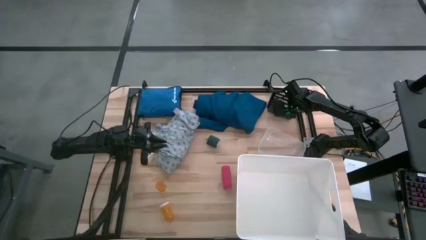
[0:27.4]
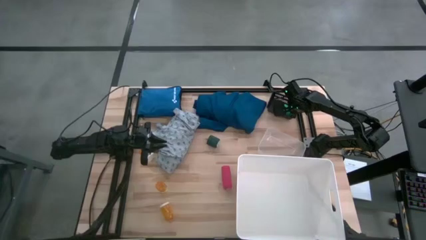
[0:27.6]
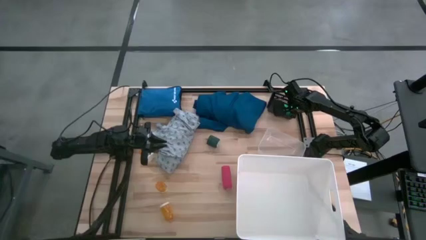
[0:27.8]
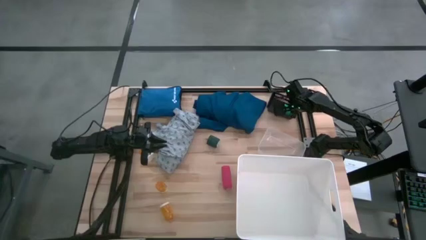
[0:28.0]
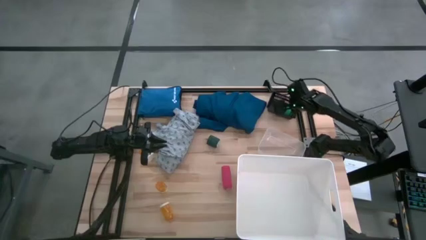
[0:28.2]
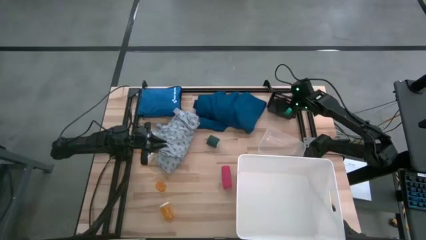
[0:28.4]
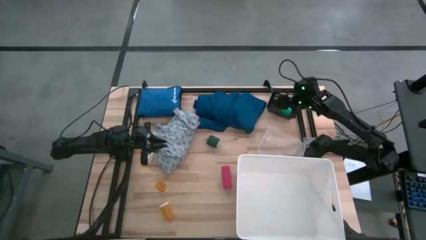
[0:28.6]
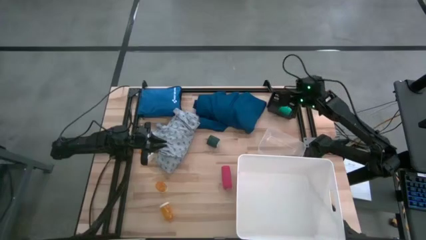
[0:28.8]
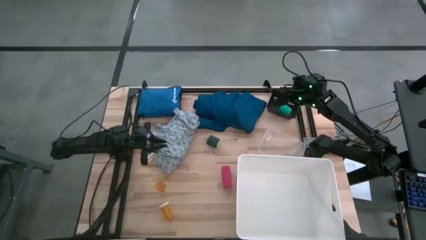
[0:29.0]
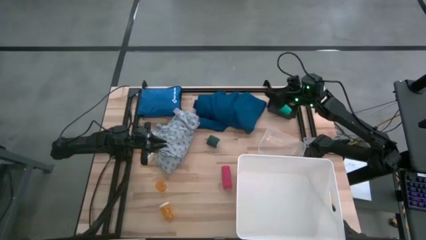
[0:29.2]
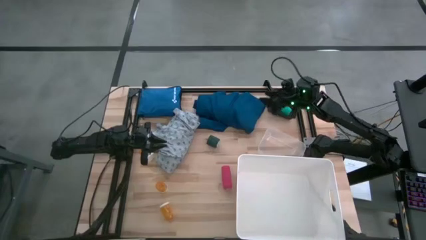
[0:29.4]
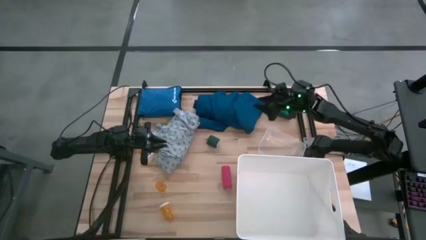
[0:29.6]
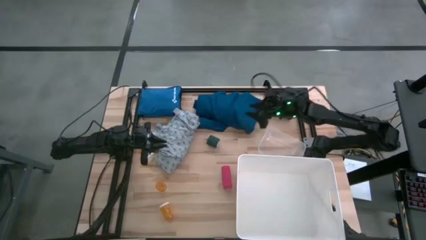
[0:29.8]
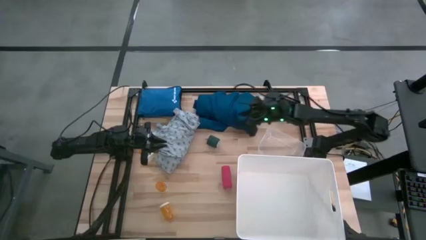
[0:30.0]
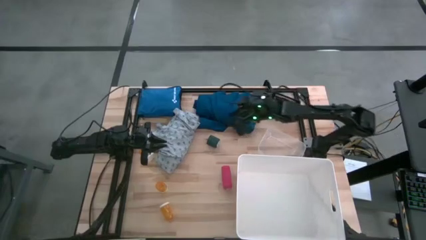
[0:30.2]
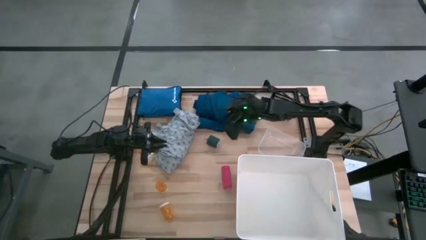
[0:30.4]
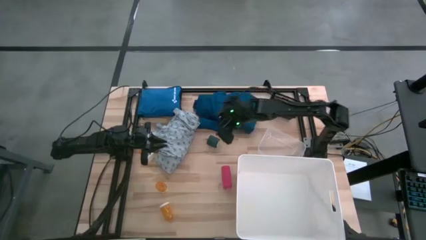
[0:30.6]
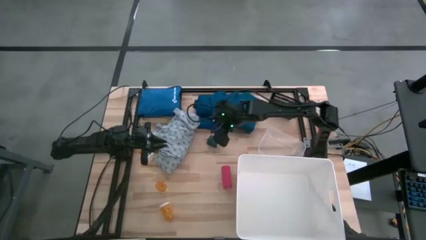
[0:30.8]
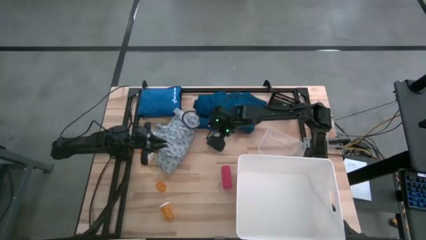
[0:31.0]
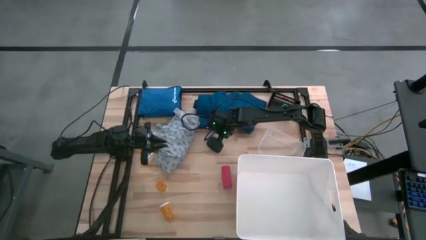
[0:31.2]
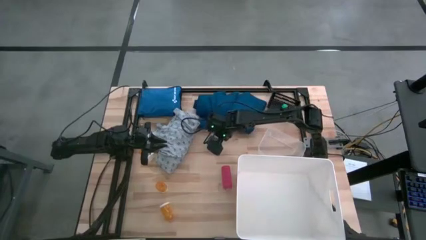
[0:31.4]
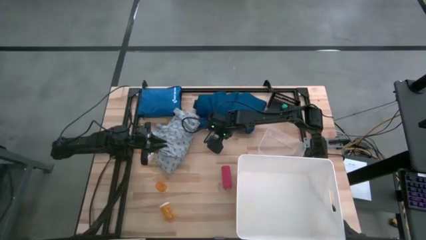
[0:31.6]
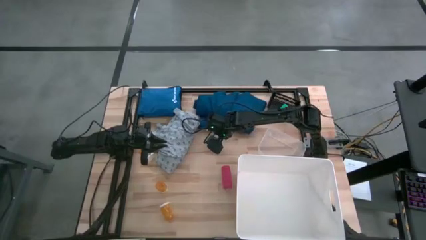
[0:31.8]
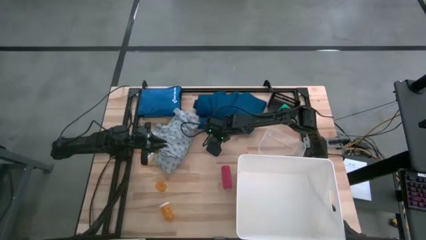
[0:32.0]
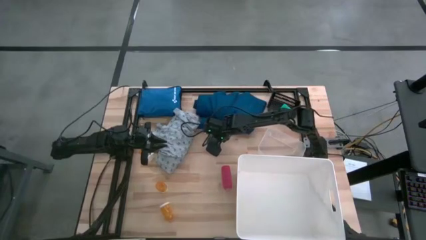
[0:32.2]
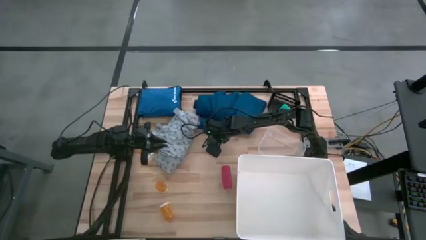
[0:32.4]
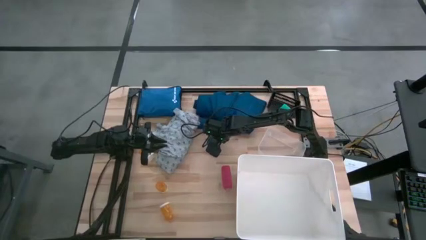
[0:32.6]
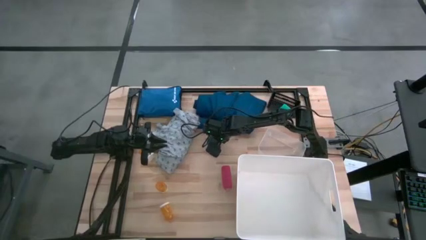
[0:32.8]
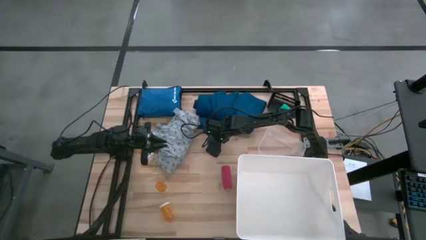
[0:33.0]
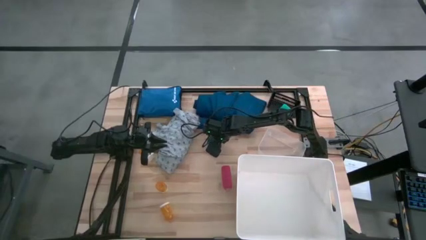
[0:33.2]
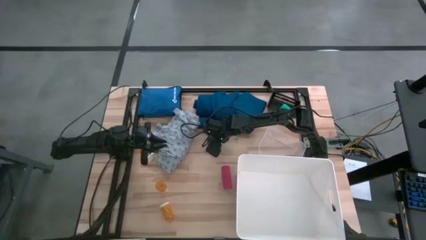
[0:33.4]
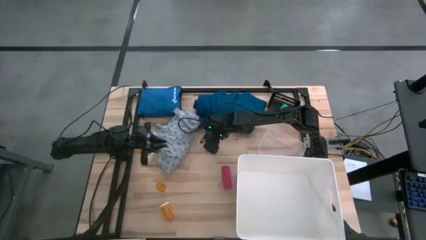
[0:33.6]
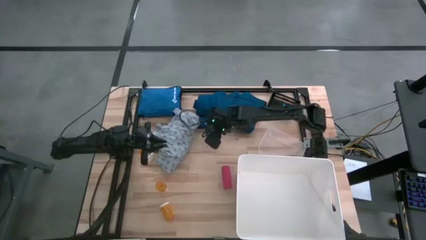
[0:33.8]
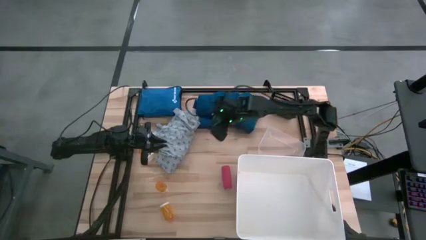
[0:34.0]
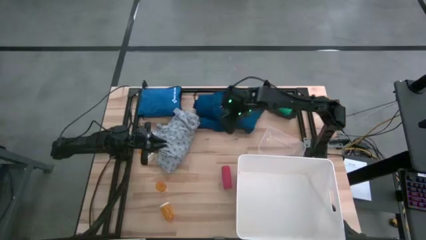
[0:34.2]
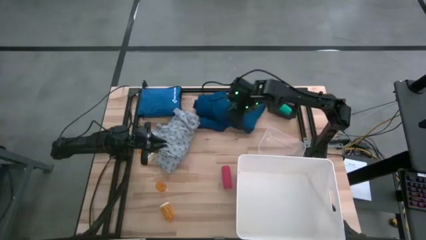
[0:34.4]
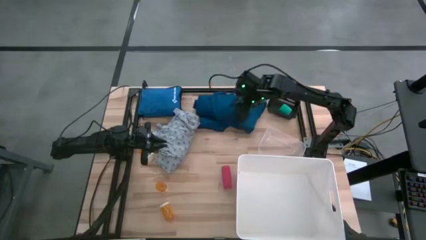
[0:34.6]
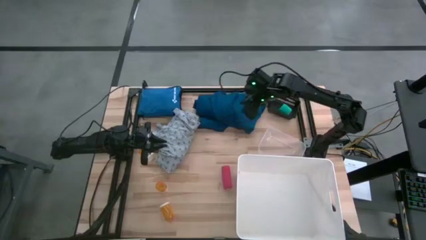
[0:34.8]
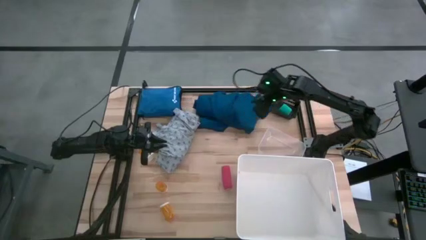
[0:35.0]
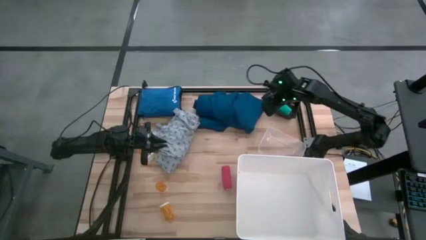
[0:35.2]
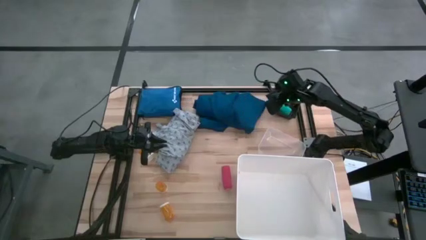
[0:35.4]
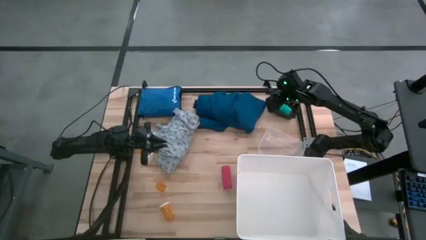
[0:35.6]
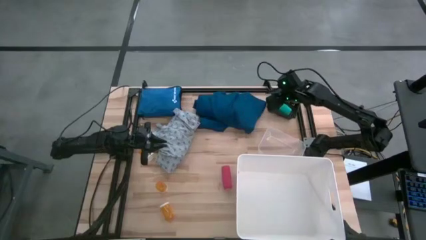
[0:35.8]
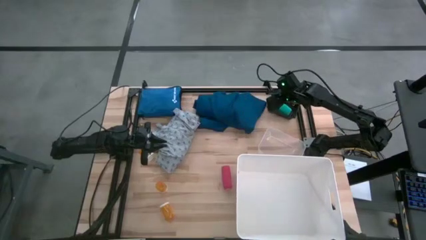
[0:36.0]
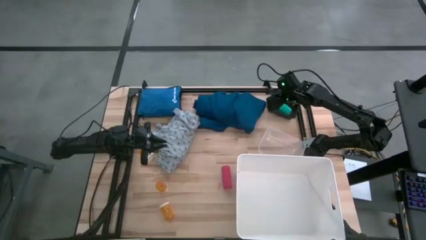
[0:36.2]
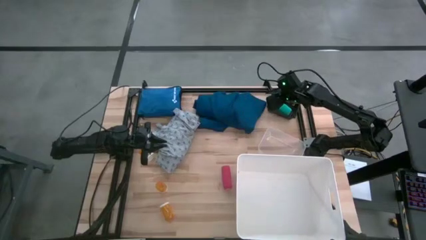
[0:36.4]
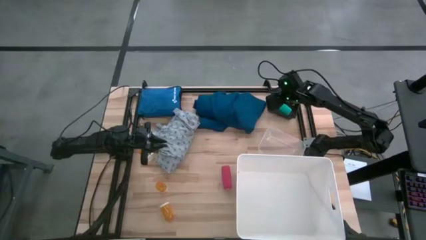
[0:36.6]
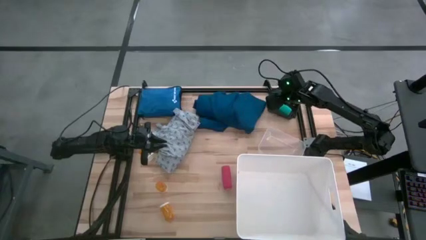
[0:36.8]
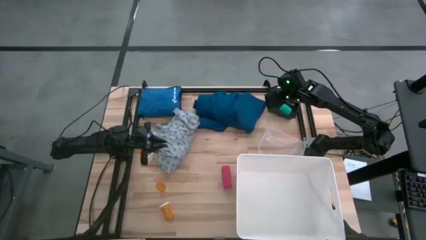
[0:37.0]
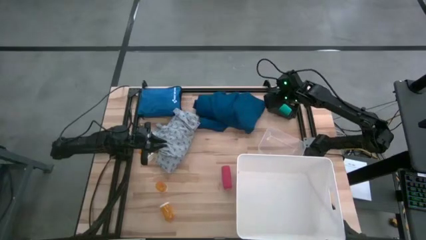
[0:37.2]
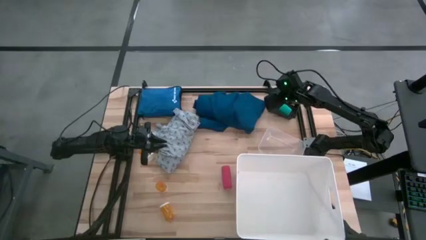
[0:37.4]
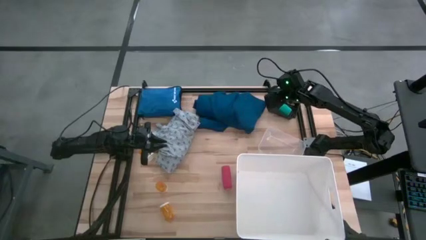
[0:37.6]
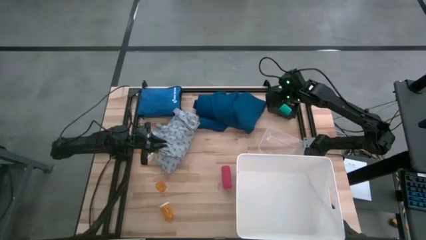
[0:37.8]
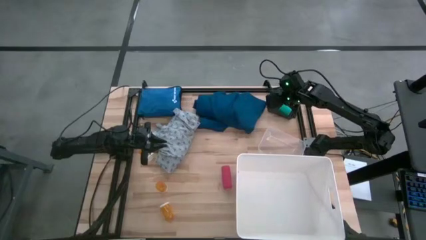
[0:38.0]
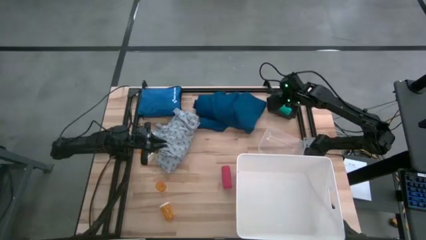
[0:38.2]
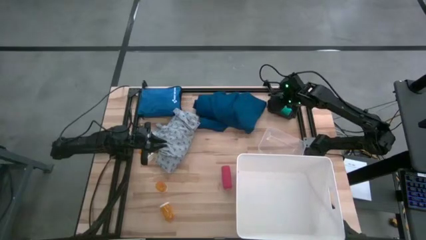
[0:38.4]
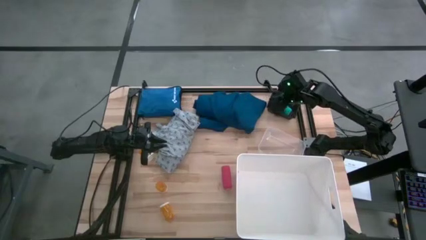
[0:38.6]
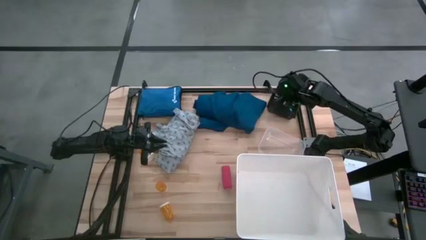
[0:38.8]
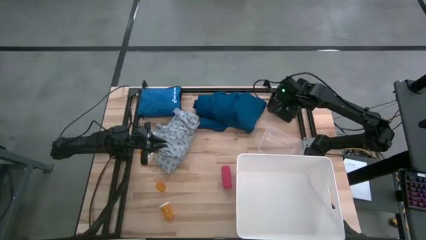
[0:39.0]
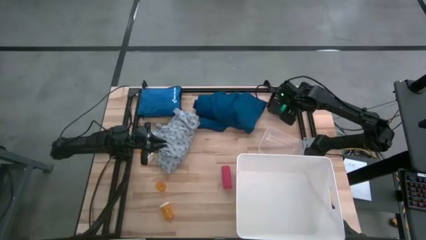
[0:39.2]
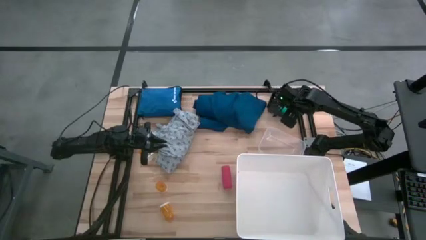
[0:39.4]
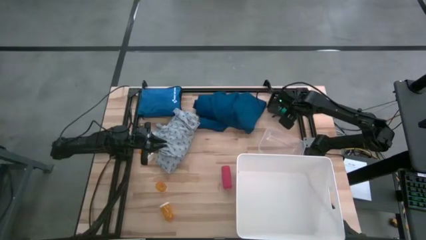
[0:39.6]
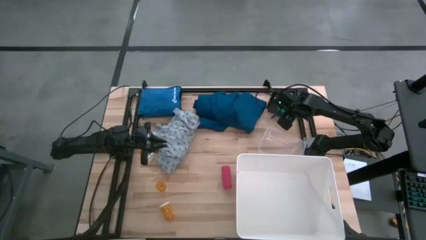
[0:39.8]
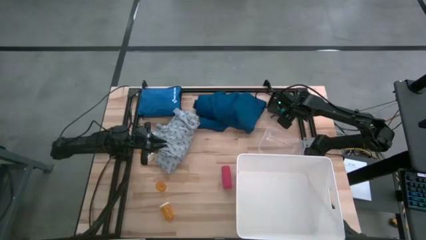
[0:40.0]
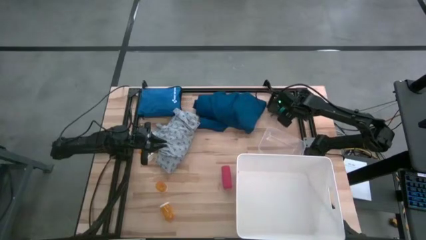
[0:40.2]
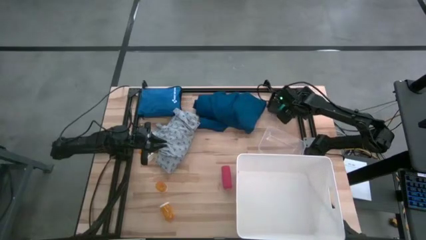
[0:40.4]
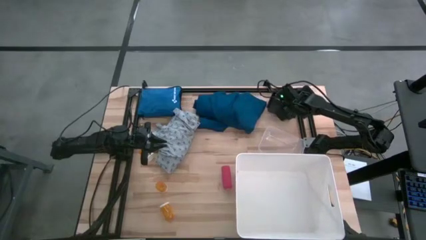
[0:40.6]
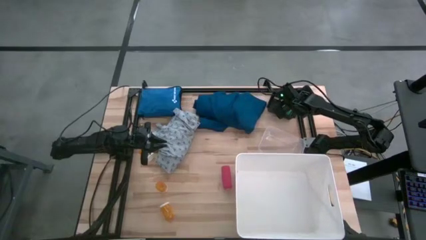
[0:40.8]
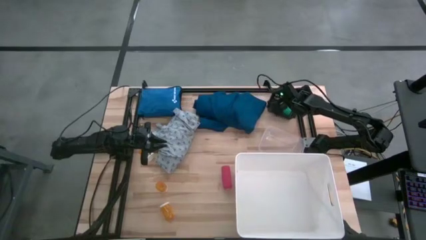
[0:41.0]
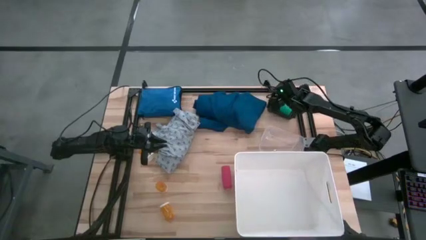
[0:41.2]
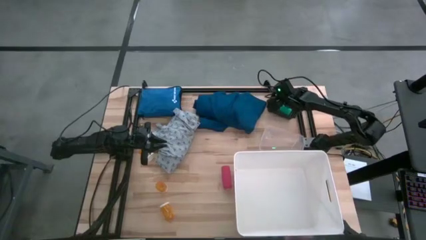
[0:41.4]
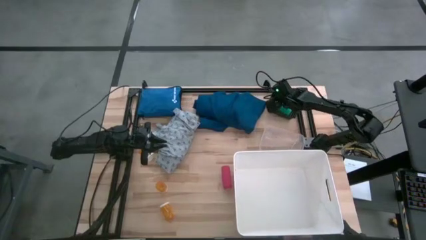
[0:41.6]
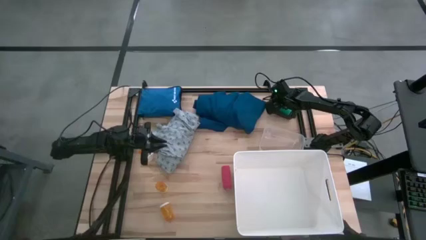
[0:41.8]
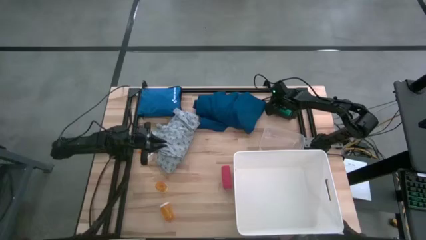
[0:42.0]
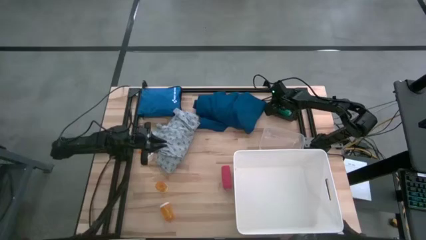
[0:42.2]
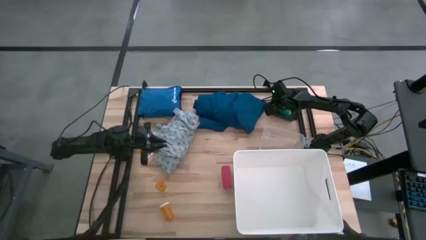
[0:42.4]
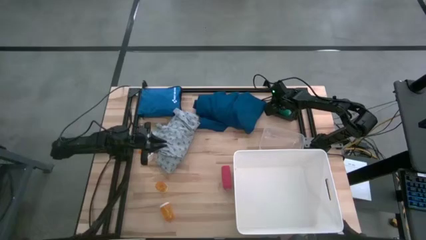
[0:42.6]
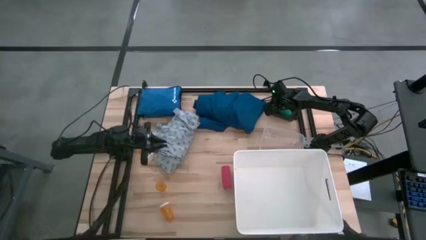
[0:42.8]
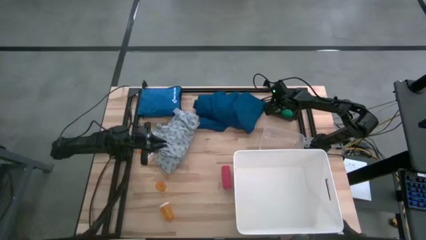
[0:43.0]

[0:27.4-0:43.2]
Task: Pick & place medical supplies in basket/bin
Put the dark green bandage into the black bin
